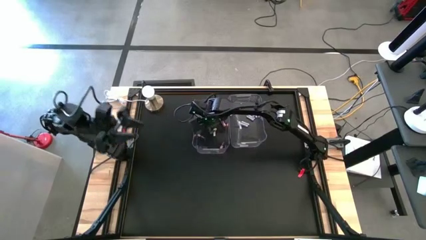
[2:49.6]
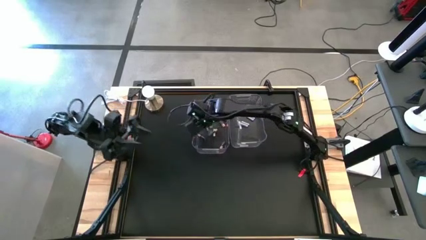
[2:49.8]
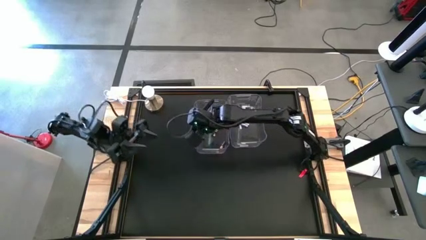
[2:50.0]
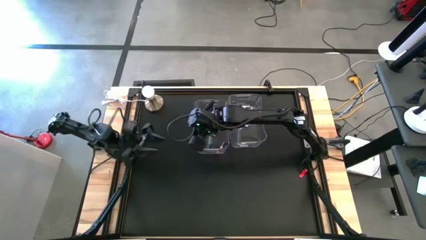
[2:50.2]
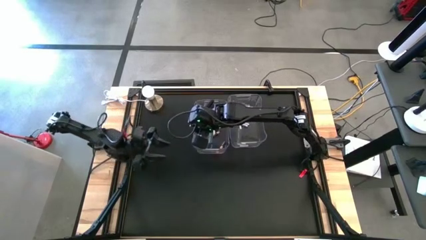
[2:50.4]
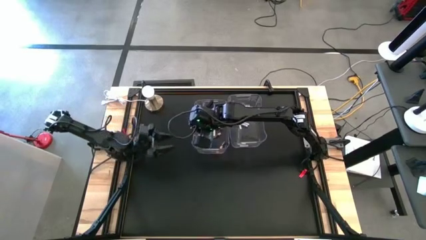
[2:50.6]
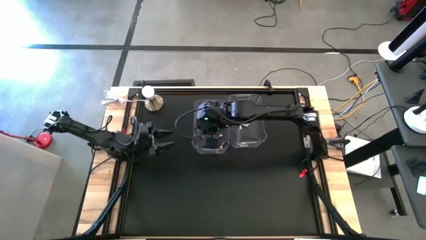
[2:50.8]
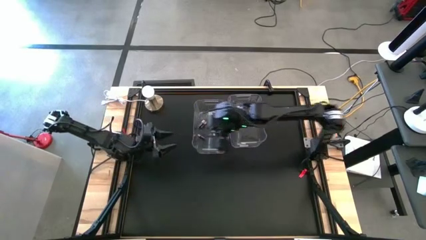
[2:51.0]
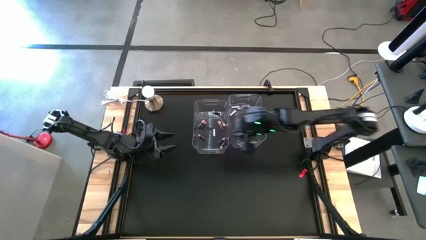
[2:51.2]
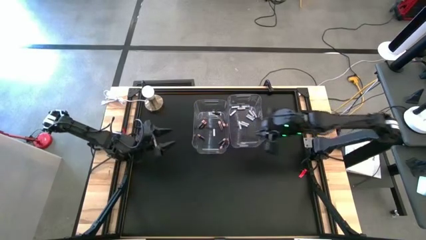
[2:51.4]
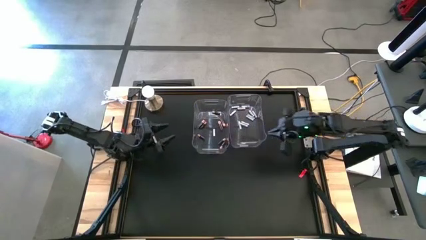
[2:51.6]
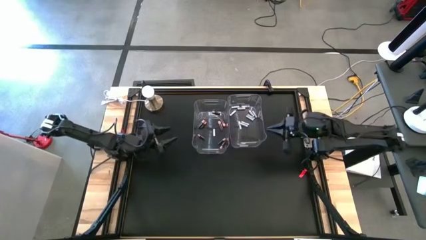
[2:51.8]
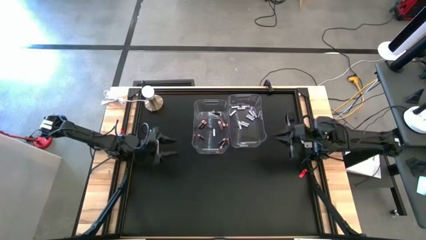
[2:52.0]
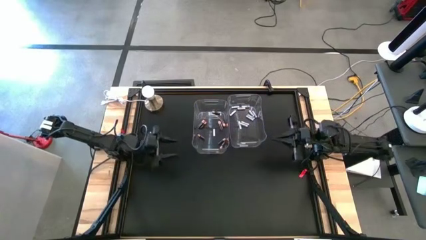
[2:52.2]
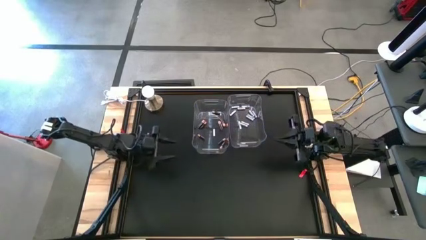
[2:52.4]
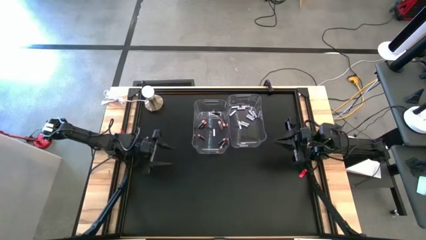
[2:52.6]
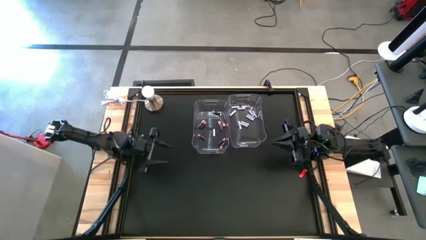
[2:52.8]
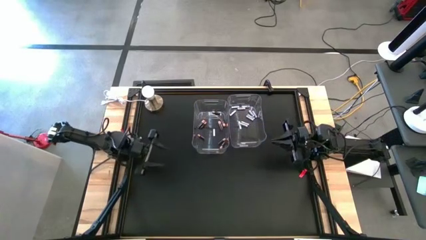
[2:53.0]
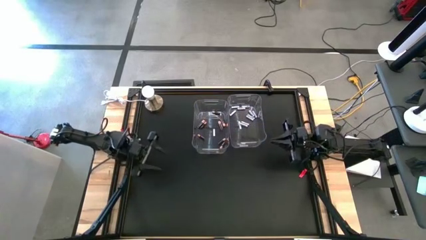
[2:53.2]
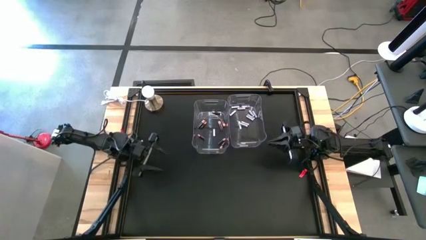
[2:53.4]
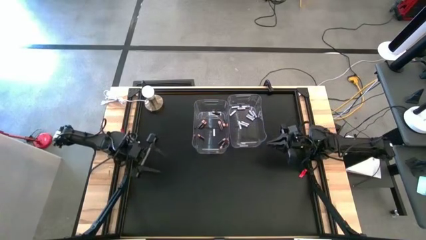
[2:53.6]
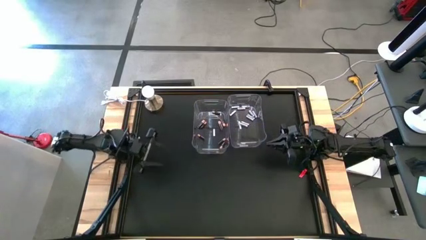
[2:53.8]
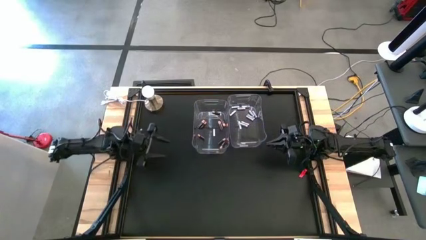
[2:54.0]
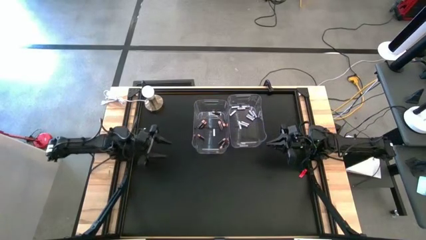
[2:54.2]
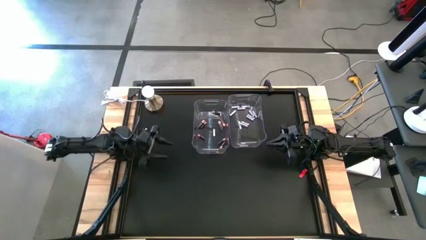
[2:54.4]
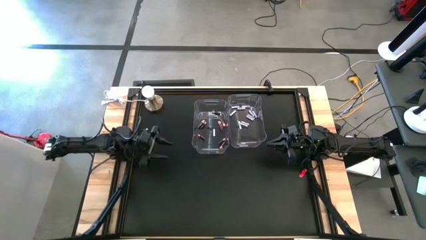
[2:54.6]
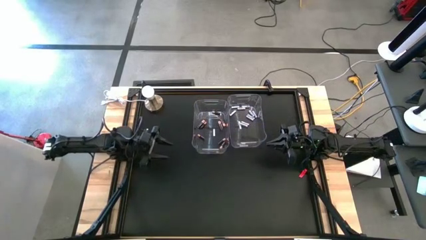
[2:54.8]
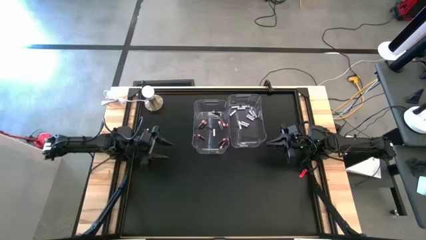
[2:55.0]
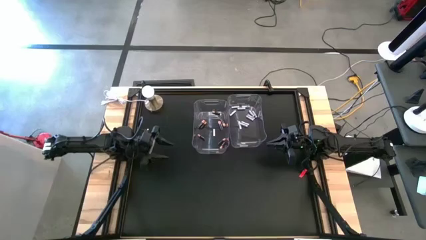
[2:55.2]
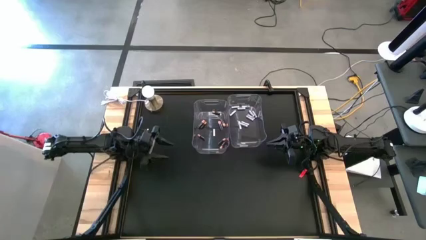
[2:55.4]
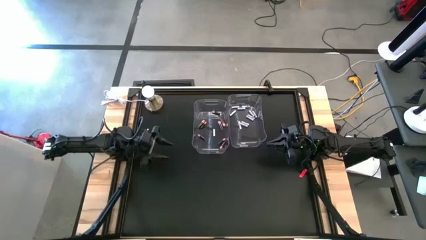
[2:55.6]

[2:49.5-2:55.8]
Task: Sort batteries
Return to Home Position

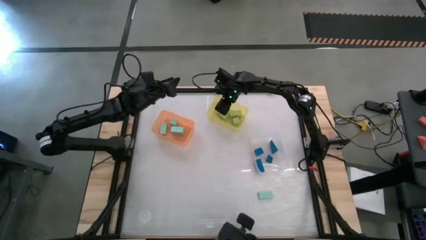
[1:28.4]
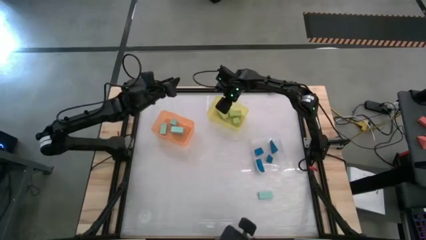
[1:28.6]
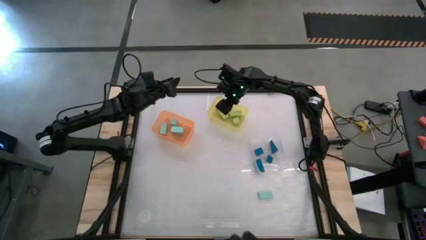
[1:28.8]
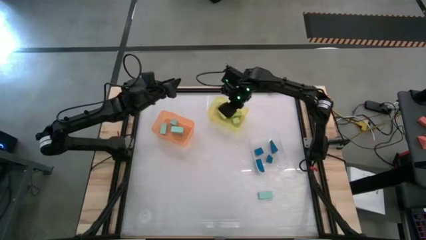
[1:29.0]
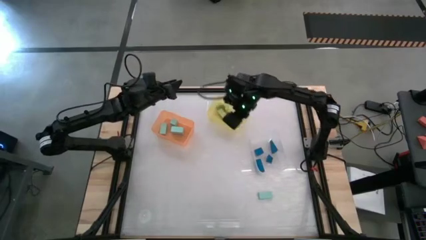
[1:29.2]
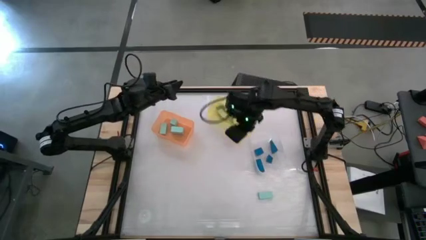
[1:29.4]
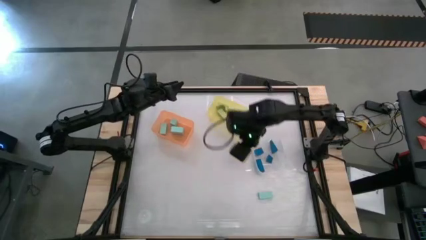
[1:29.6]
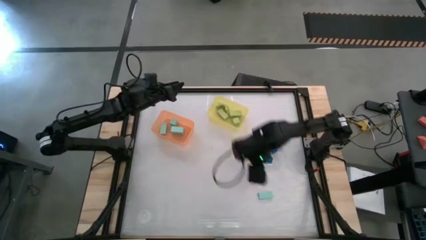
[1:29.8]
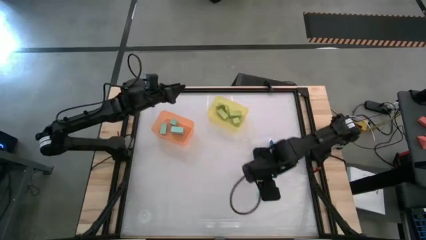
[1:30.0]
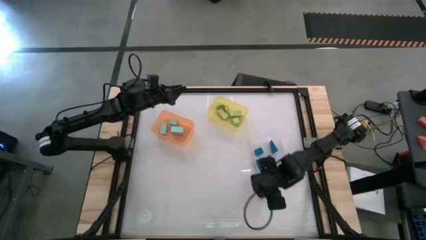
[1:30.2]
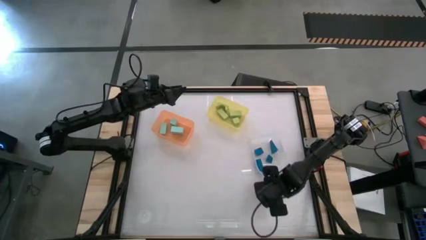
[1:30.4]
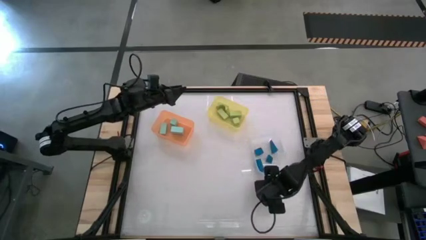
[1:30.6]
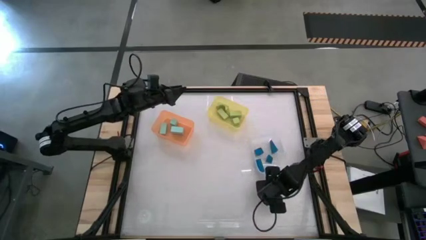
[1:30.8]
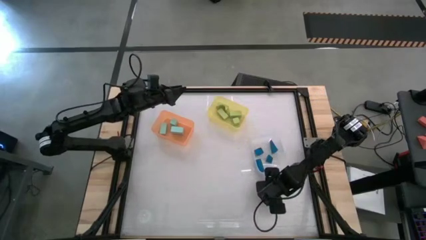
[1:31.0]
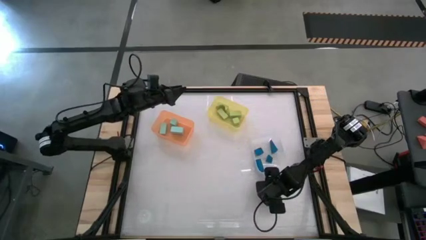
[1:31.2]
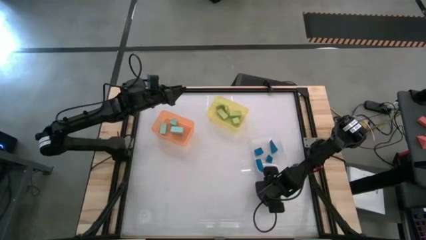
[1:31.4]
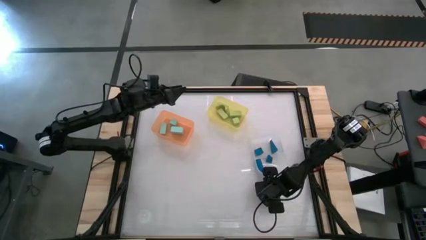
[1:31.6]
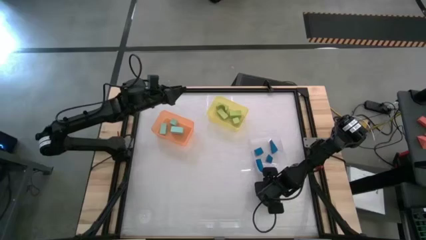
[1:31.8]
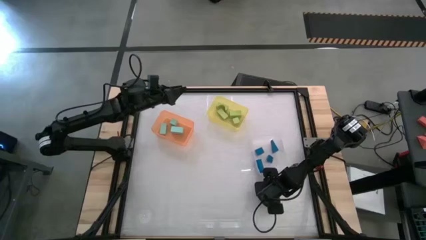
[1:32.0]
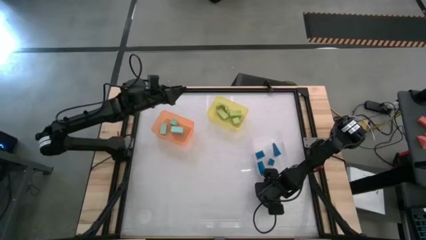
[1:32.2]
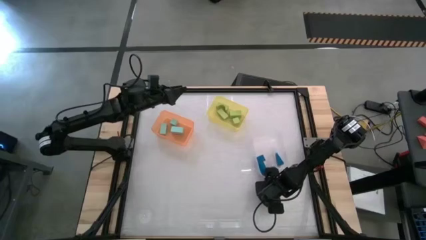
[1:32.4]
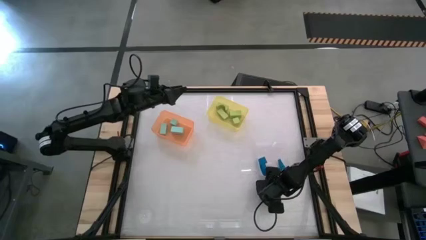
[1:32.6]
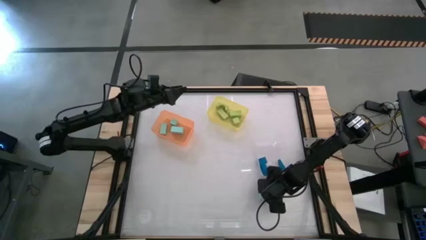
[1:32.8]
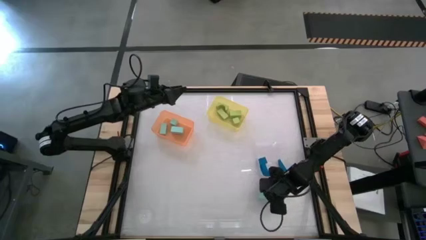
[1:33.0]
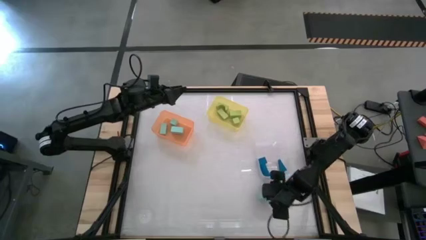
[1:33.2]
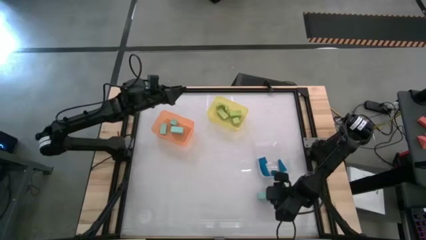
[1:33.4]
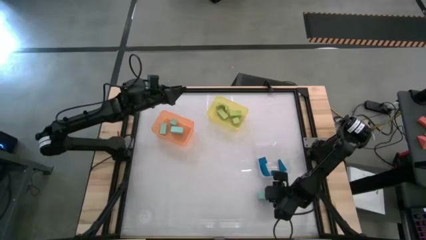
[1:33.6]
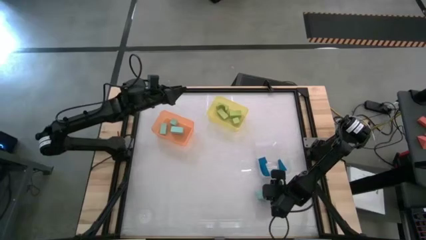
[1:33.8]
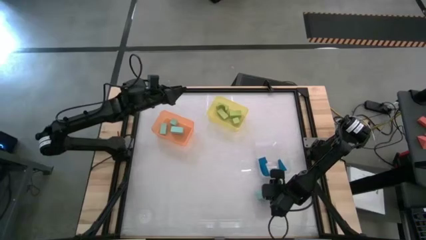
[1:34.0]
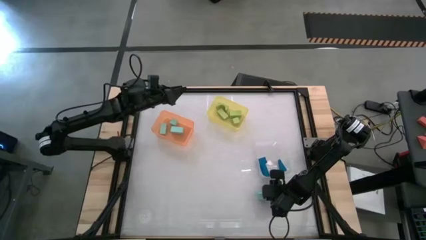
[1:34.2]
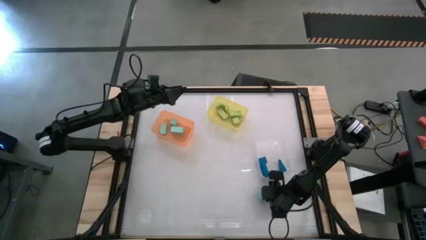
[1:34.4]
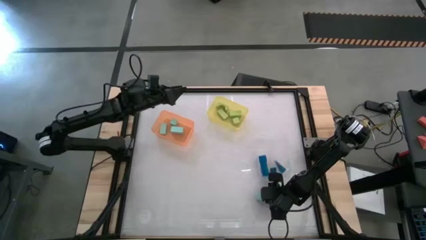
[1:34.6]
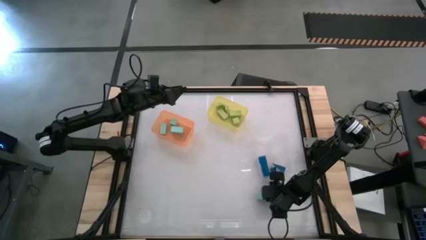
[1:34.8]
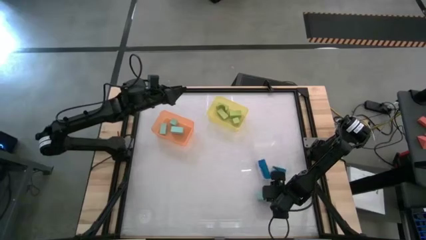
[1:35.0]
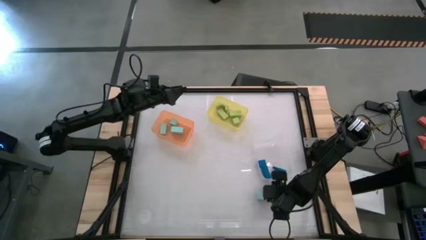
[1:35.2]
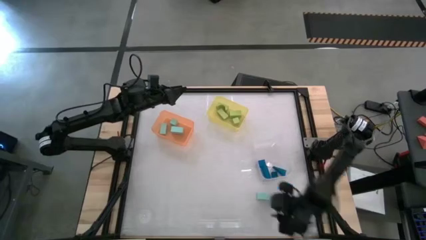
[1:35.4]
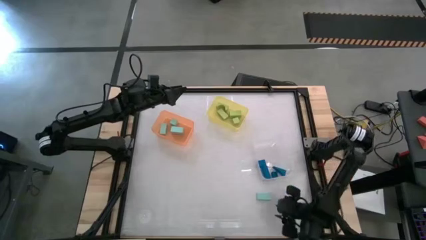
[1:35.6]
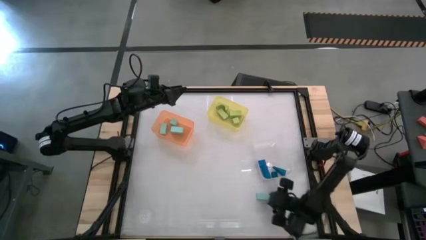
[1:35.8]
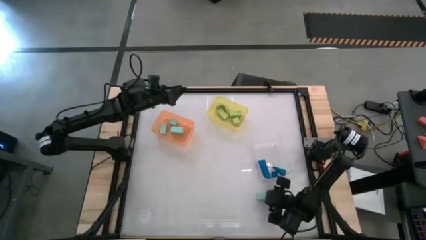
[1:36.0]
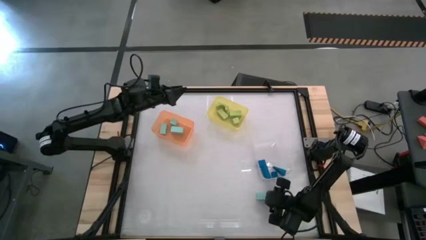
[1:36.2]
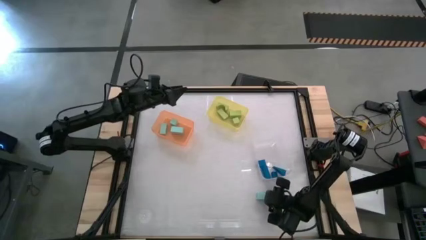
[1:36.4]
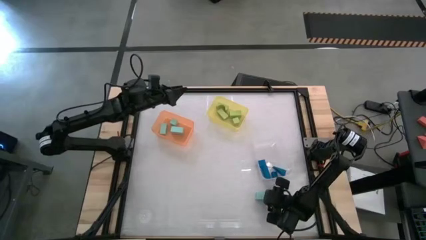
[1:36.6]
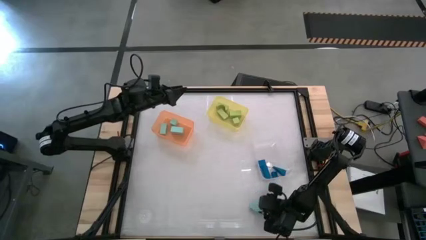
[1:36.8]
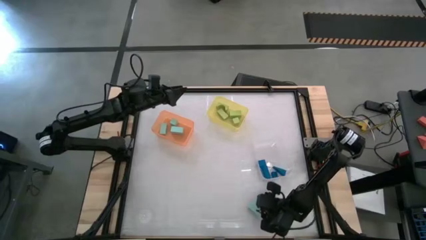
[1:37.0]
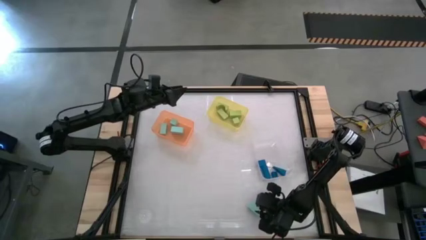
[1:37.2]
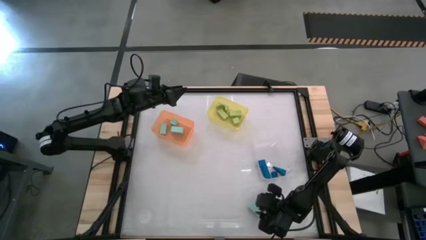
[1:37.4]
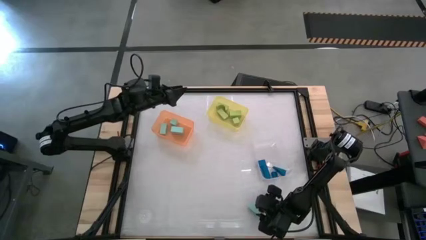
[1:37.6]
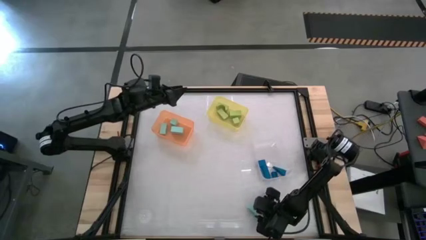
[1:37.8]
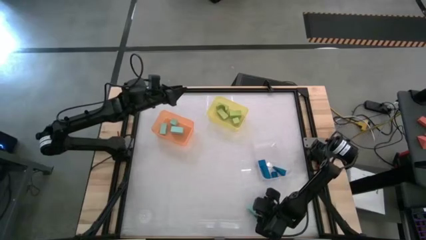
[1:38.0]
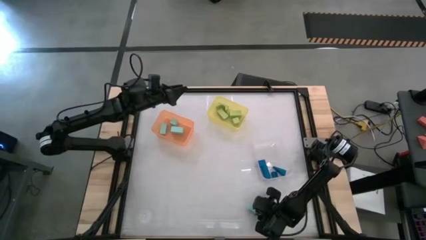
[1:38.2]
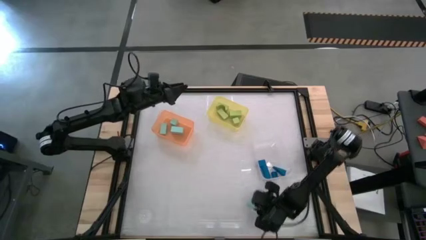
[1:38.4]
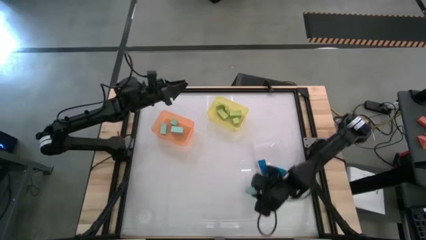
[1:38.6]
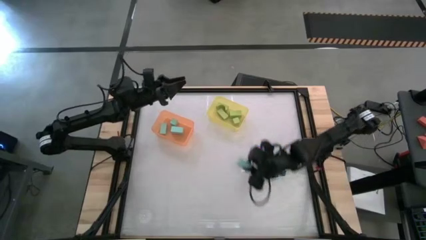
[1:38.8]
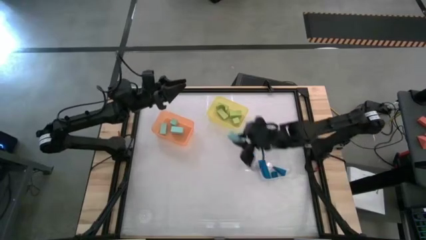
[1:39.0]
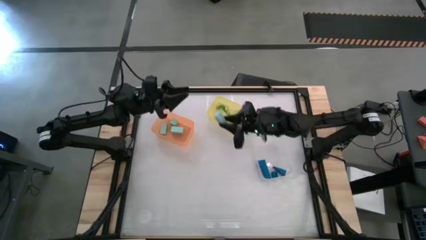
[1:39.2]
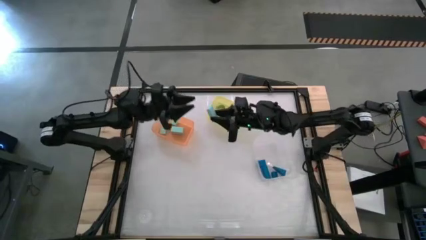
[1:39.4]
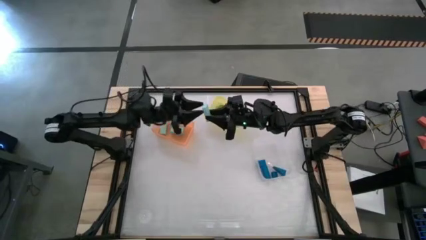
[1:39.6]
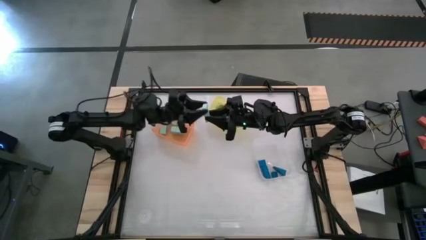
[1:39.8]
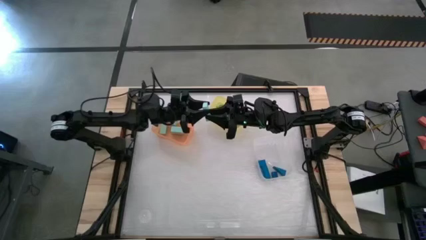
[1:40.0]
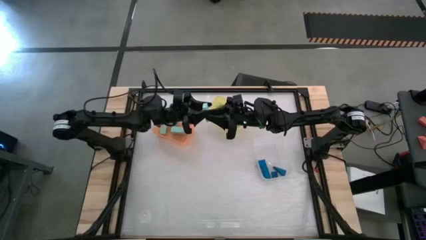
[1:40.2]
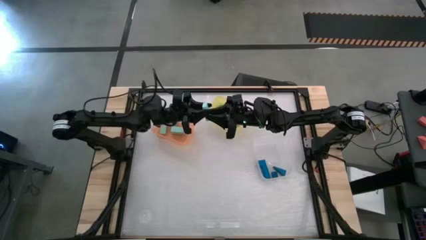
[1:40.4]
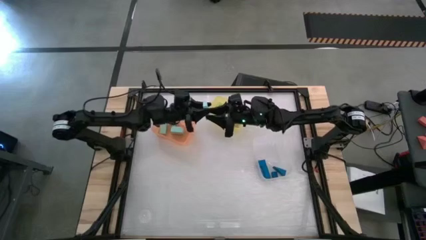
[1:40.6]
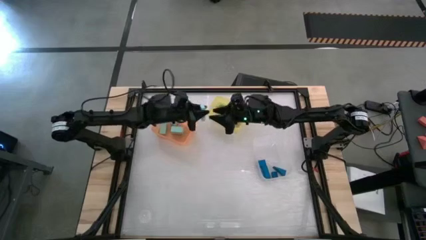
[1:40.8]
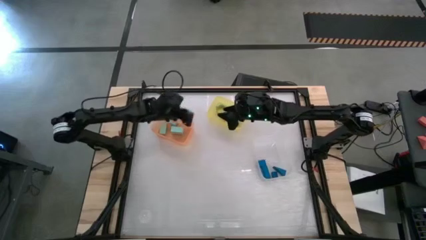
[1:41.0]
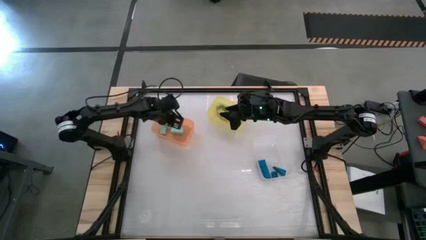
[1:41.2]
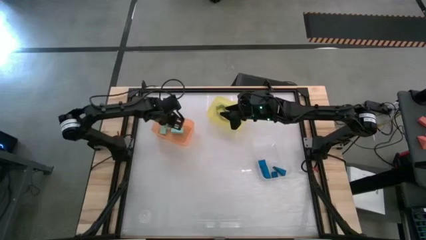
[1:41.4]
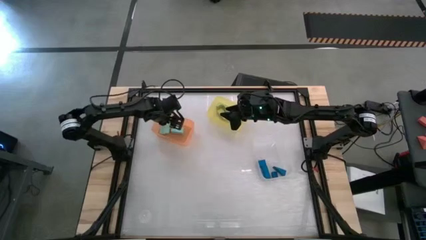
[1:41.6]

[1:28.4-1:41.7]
Task: Sort & place blocks by color
Put the light blue block into the orange bin
